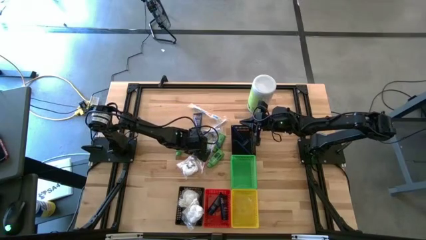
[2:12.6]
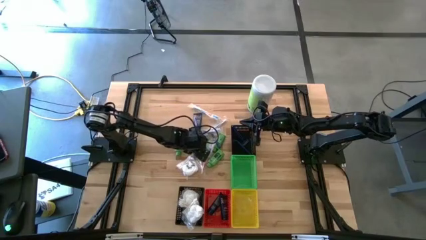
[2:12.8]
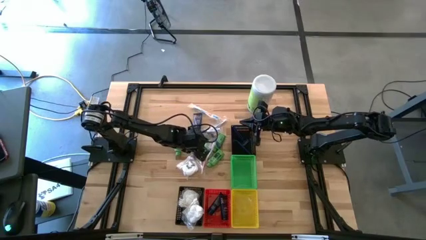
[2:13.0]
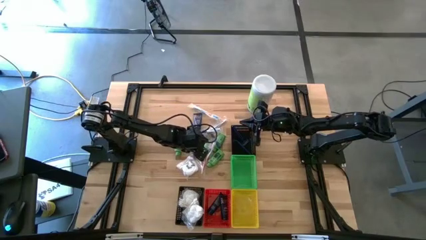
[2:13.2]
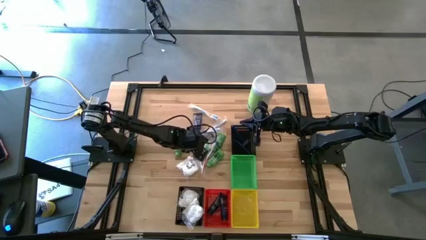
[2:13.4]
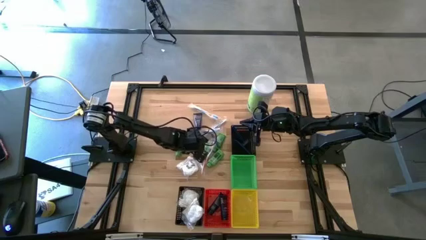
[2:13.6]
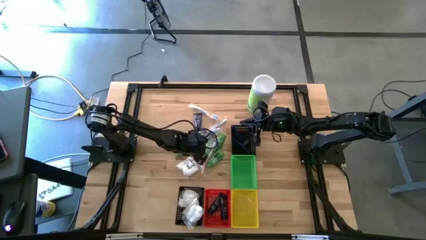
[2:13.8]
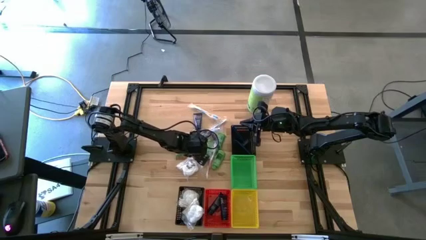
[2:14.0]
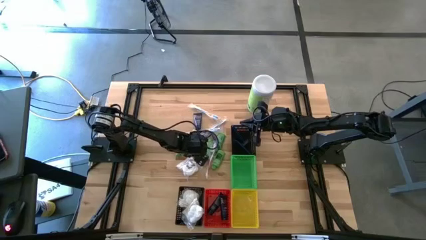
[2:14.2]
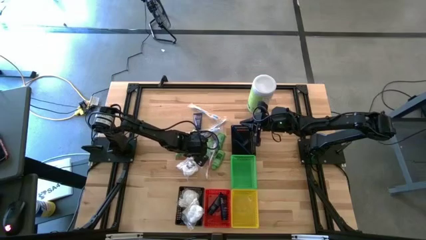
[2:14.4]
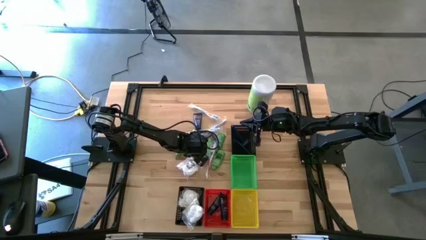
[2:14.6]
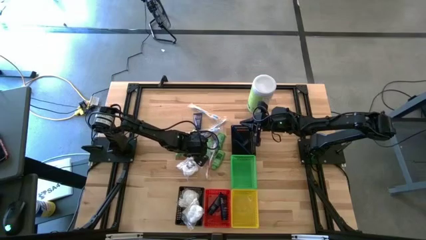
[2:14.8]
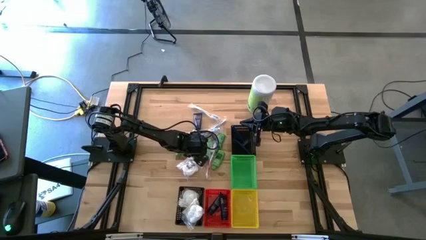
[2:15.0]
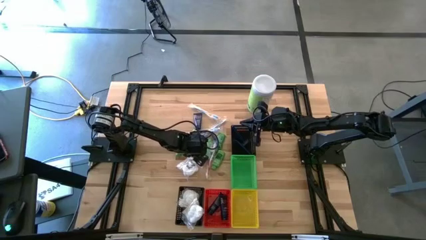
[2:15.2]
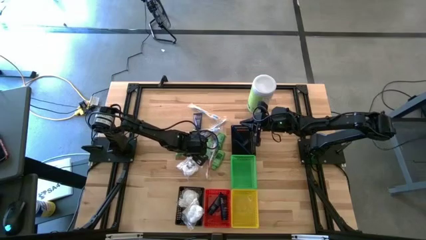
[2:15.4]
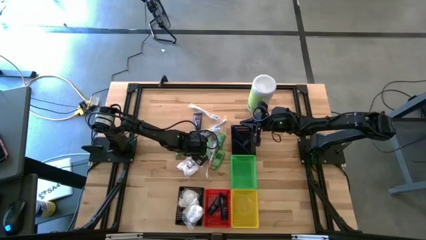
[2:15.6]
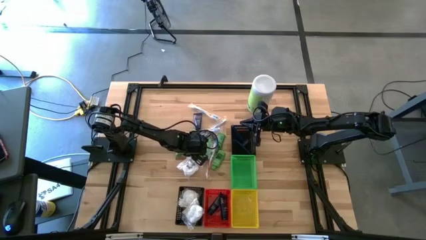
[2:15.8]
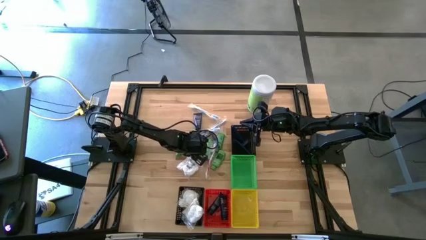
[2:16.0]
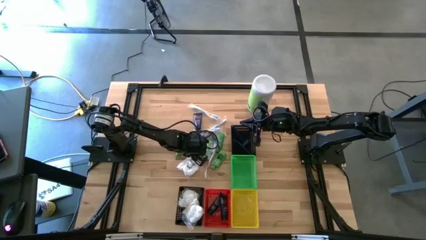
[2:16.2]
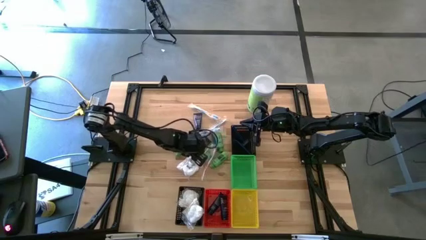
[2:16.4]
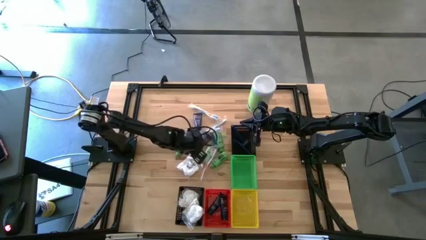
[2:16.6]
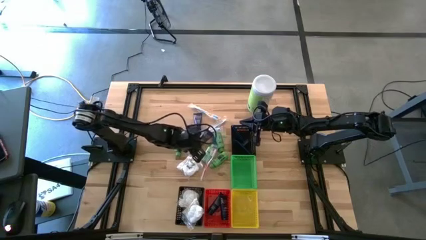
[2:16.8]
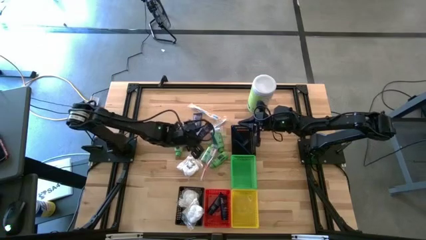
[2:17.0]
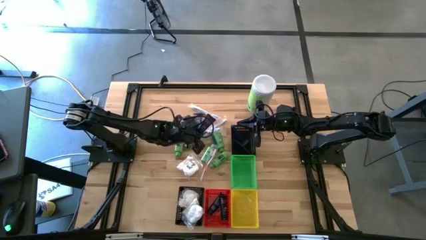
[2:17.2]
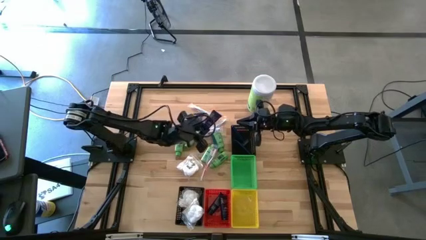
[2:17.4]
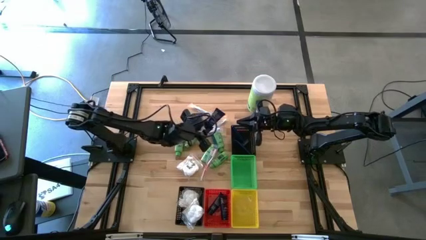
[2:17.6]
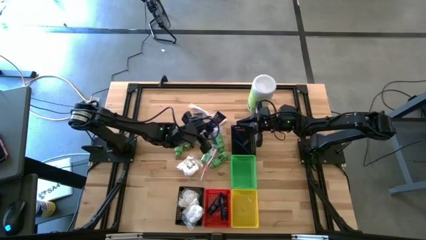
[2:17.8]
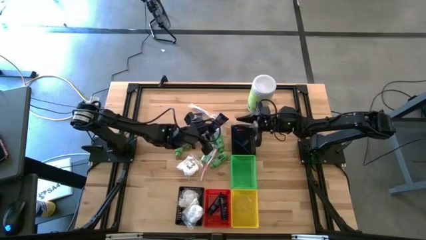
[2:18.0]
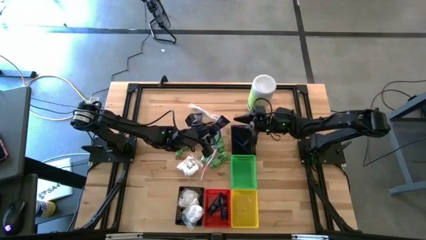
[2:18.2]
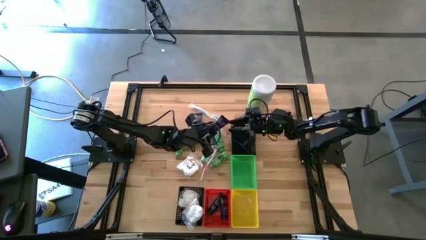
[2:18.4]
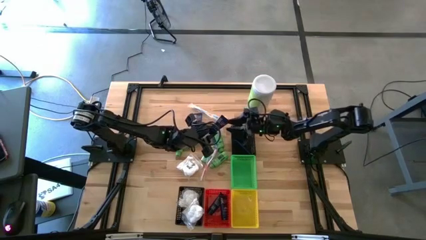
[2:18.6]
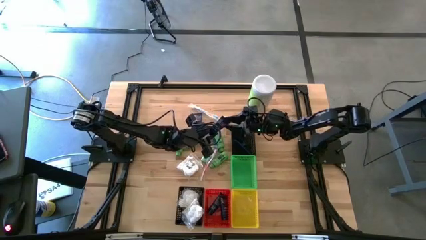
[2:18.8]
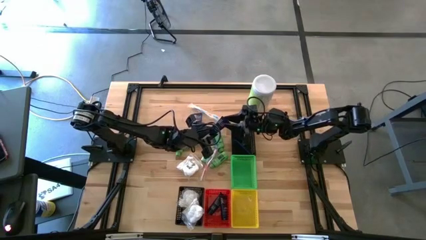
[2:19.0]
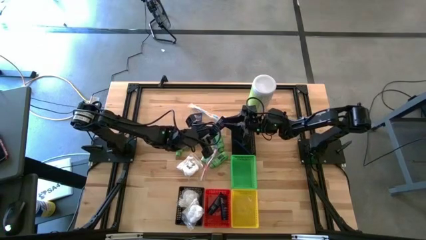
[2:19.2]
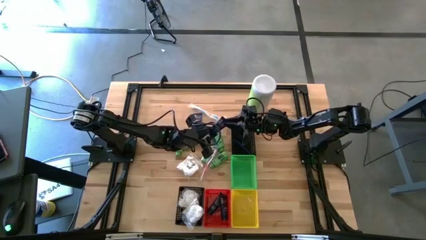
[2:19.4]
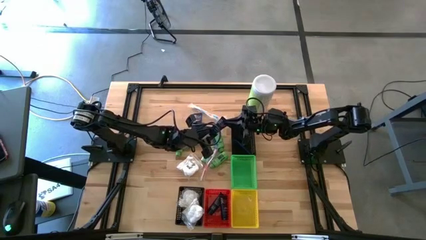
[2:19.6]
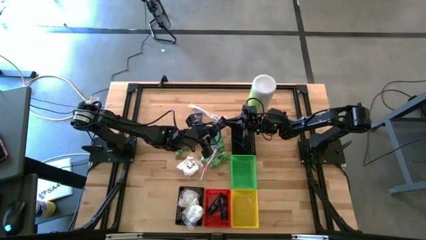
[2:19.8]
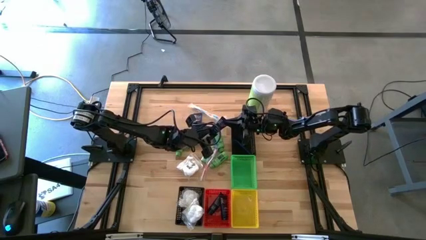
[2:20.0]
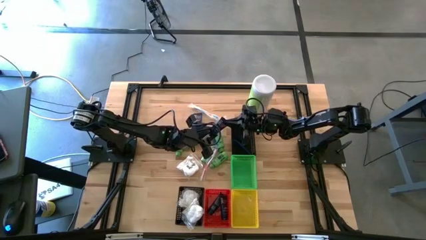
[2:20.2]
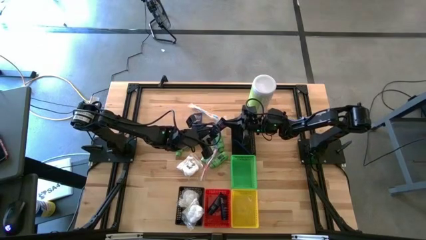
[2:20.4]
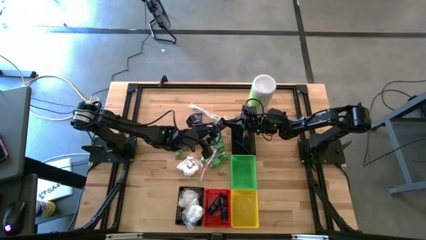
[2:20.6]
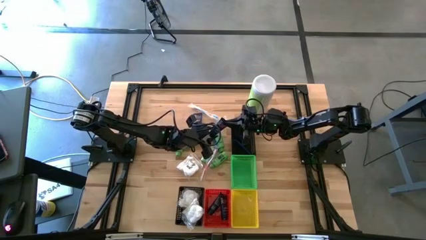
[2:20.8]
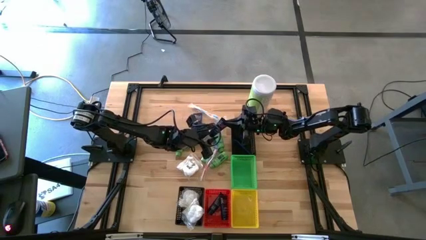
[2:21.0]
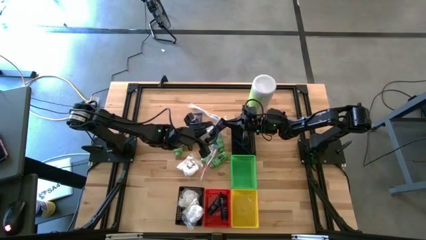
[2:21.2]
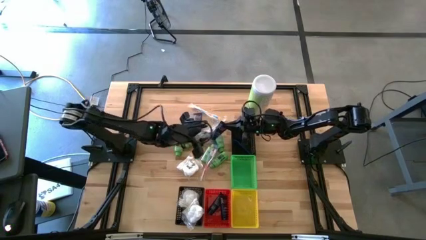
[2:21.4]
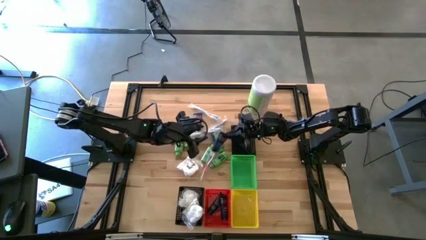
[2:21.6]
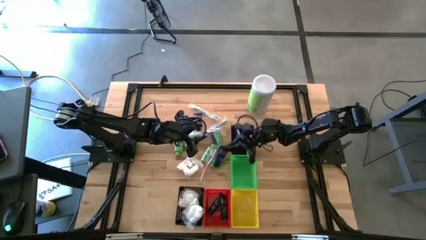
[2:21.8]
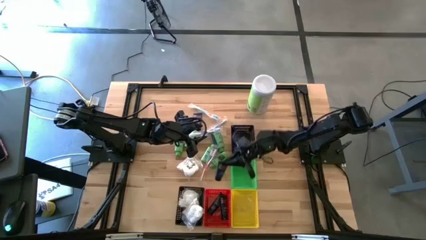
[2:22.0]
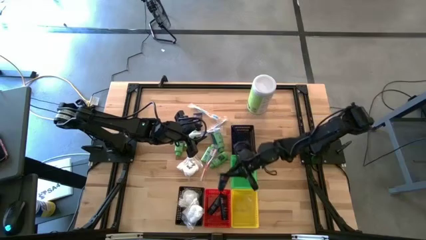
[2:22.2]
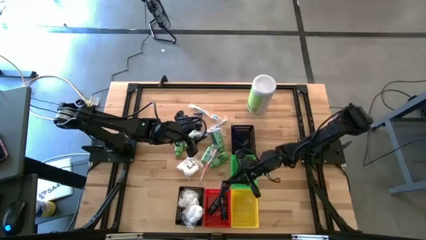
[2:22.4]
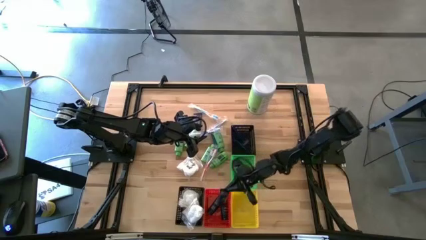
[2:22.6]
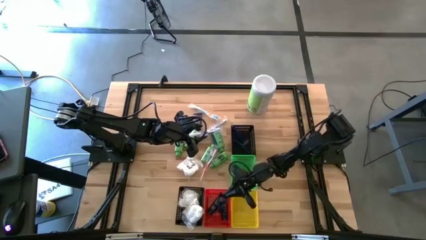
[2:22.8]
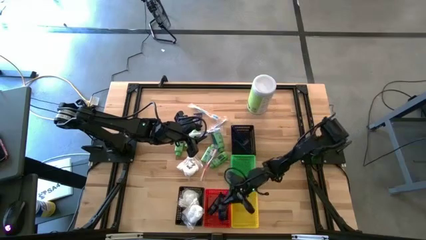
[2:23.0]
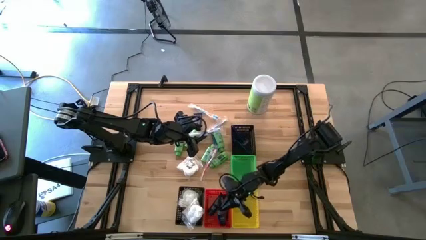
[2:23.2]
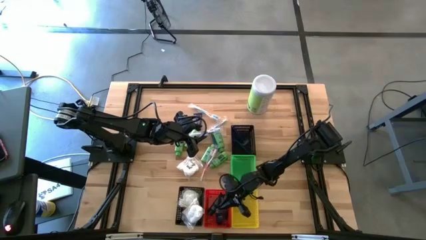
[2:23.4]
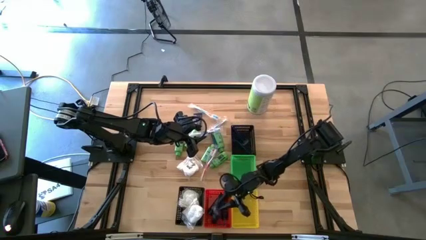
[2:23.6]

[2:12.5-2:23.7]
Task: Pick & Place Travel size toiletries
Put the blue shave cream into the red bin

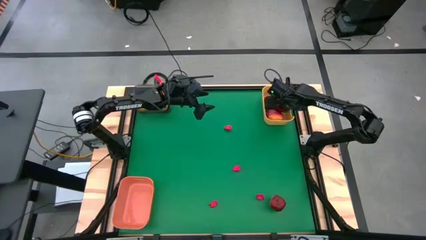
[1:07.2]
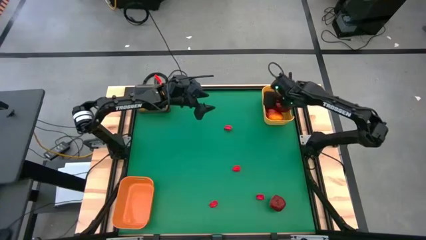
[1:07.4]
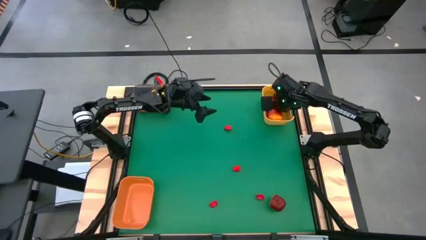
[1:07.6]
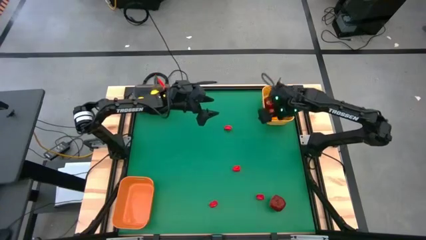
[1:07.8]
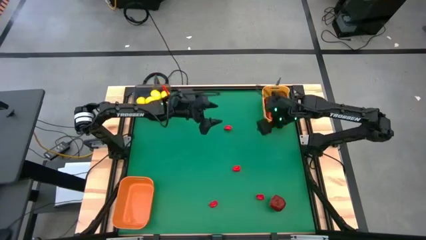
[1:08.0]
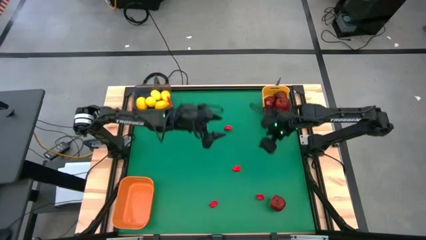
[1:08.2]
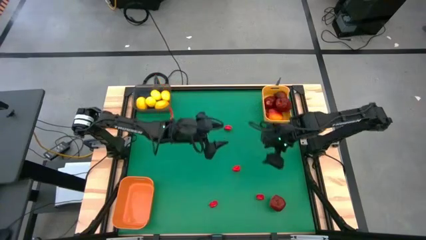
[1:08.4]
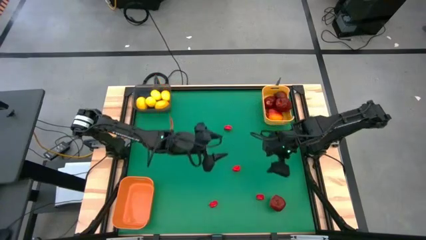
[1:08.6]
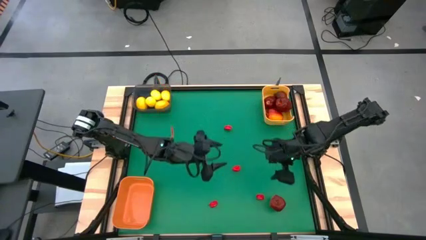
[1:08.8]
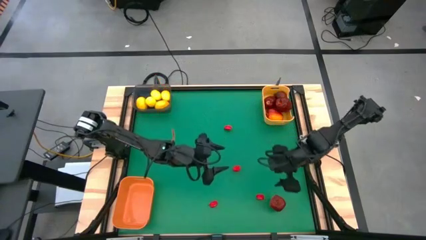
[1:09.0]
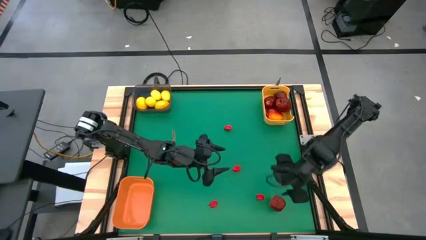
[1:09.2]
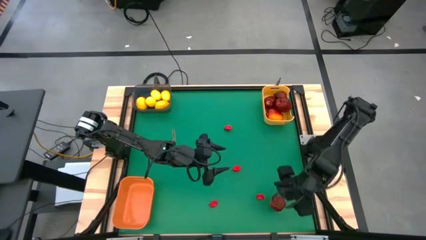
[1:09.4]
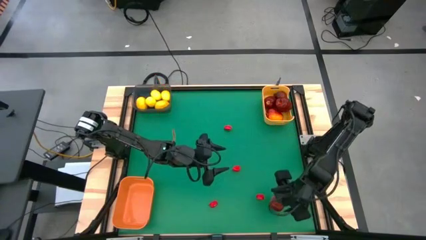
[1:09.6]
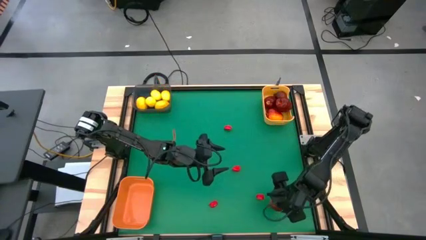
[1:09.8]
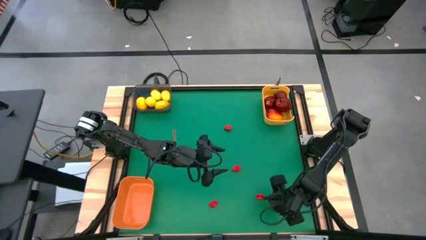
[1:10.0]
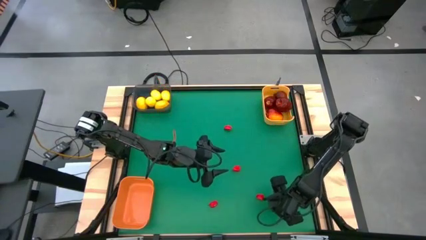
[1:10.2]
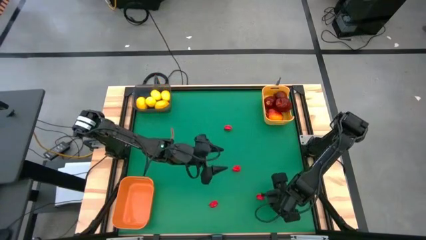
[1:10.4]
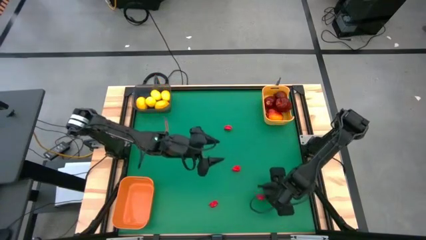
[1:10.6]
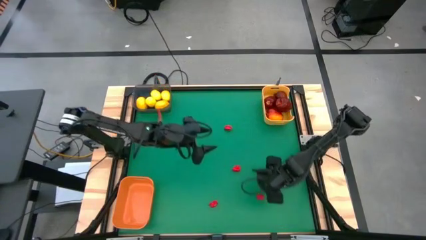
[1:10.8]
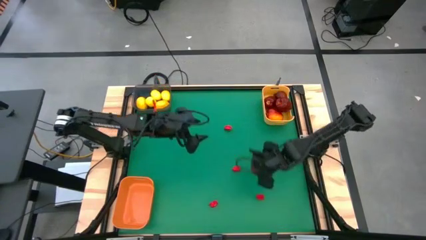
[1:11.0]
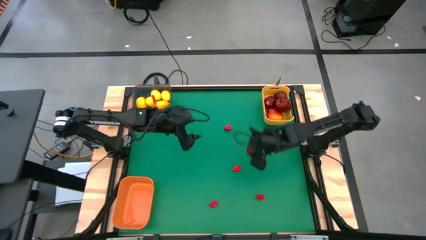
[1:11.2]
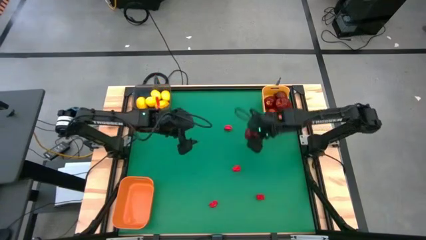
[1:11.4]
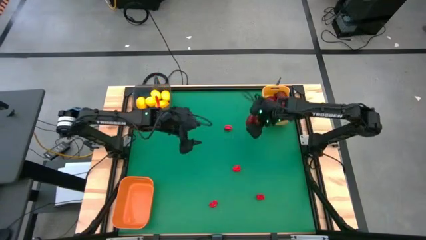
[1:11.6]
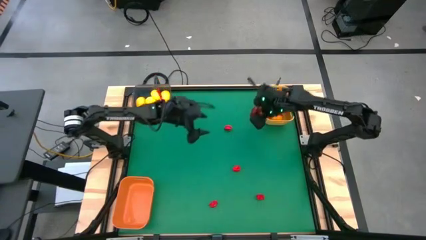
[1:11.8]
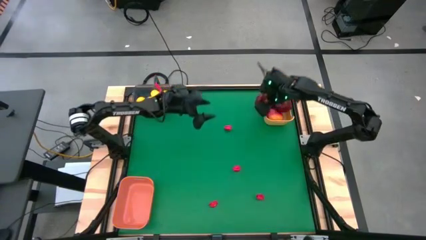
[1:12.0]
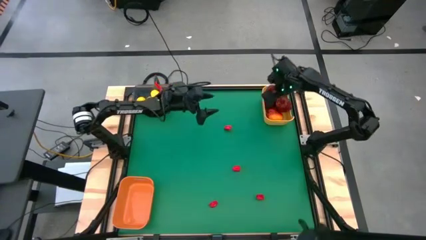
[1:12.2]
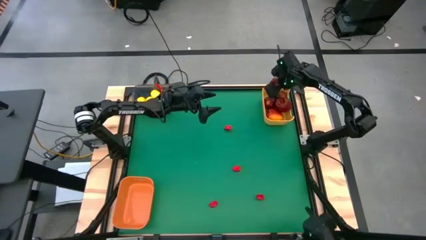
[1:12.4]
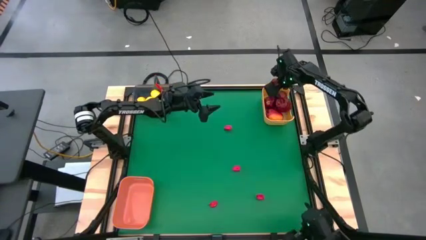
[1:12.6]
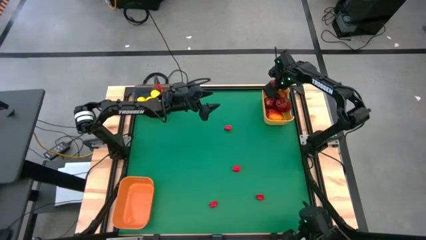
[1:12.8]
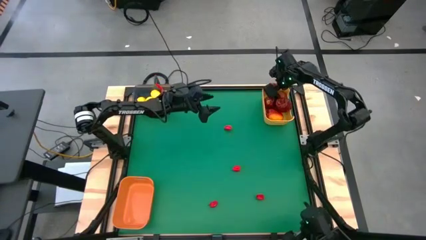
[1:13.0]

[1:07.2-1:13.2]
Task: Sort produce into baskets
Put the red apple into the yellow bin
